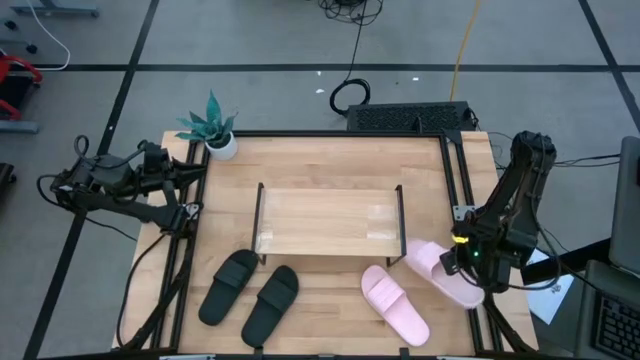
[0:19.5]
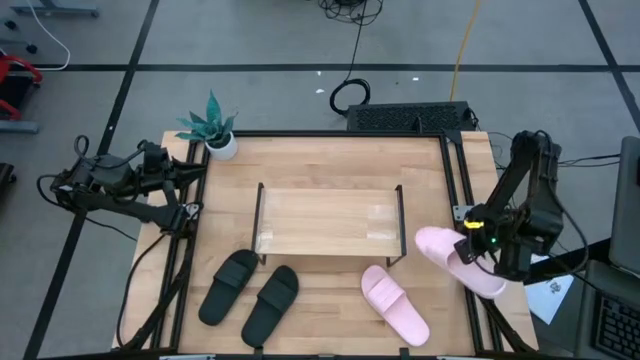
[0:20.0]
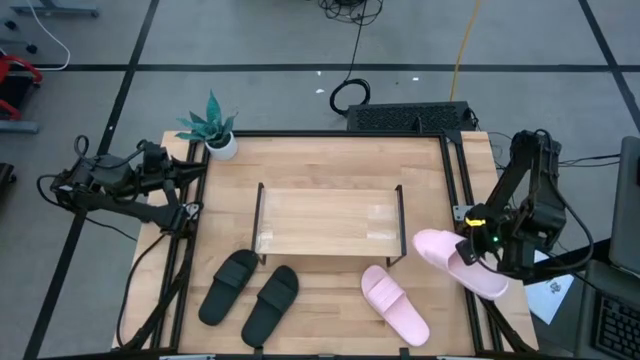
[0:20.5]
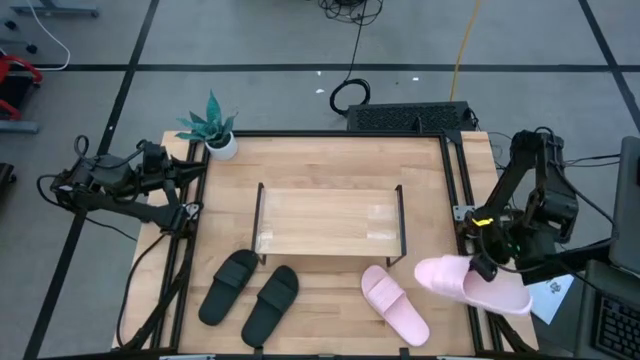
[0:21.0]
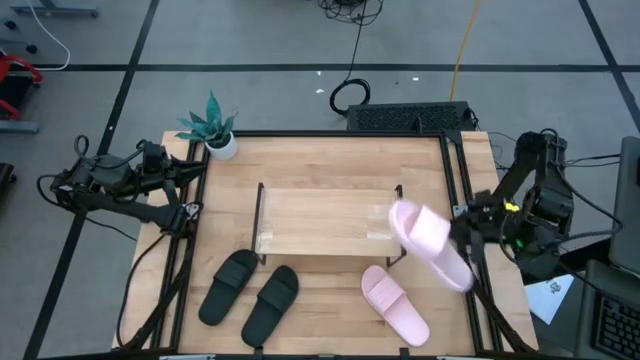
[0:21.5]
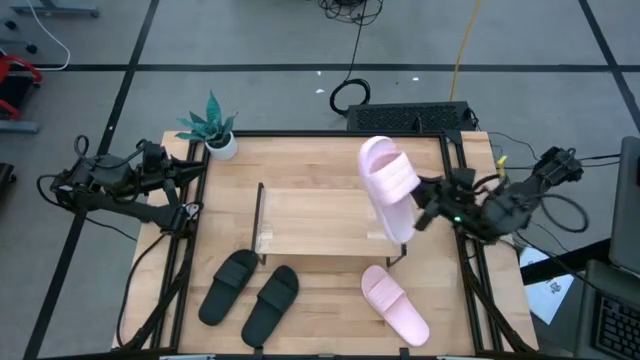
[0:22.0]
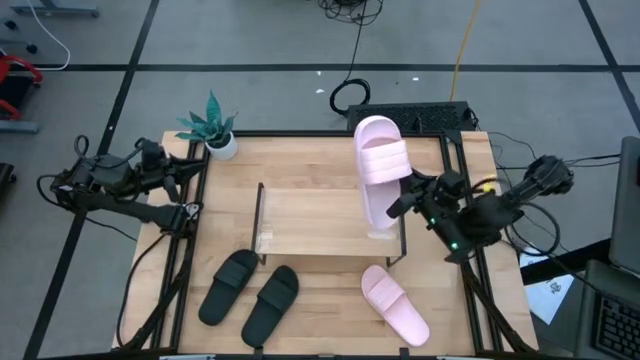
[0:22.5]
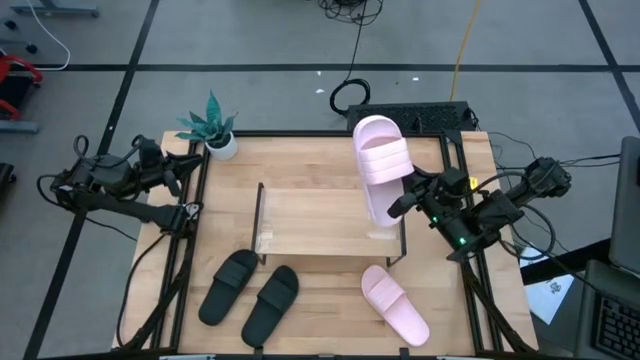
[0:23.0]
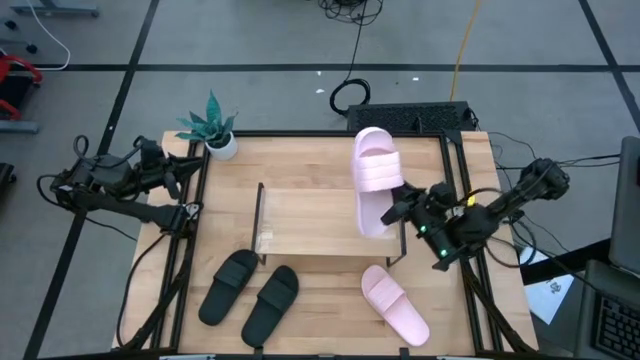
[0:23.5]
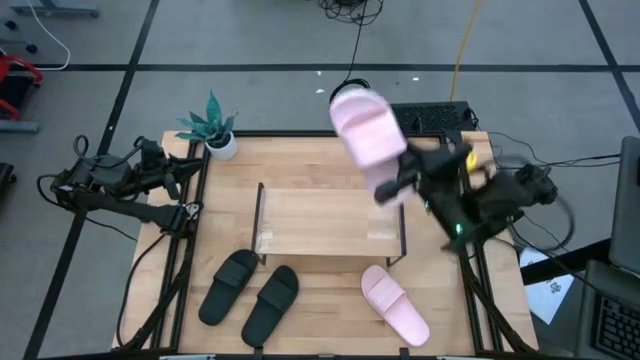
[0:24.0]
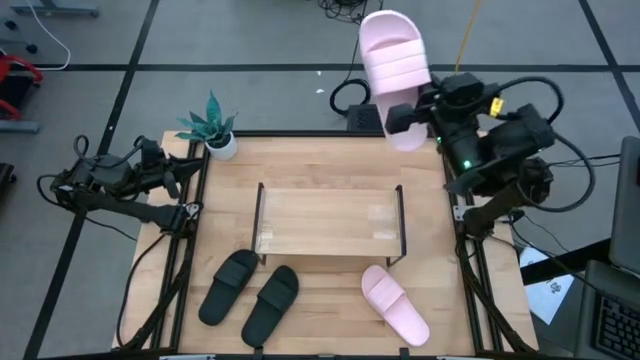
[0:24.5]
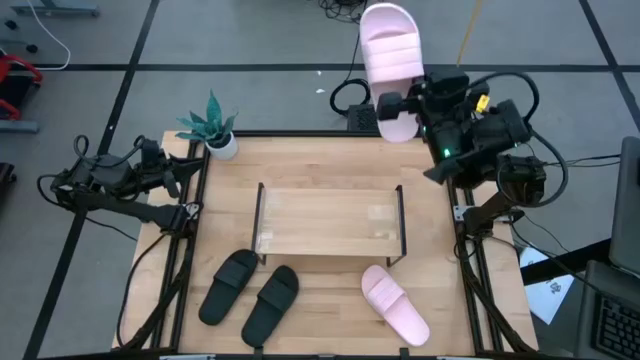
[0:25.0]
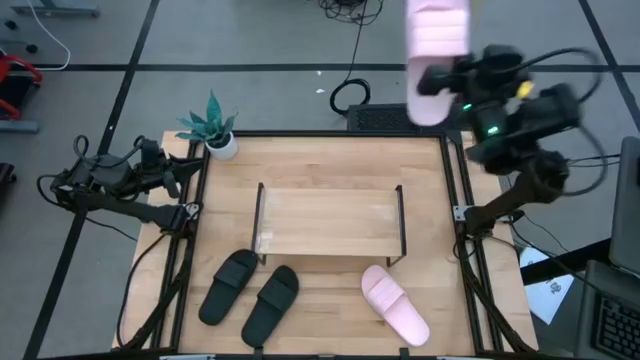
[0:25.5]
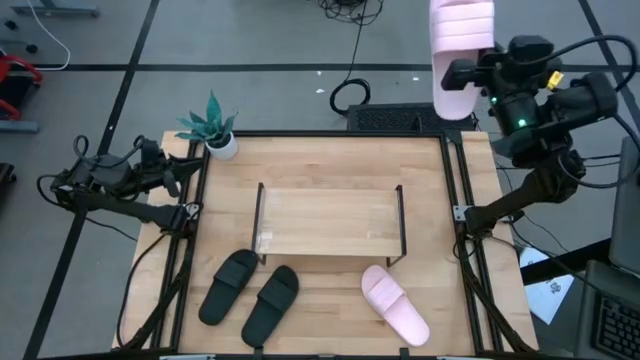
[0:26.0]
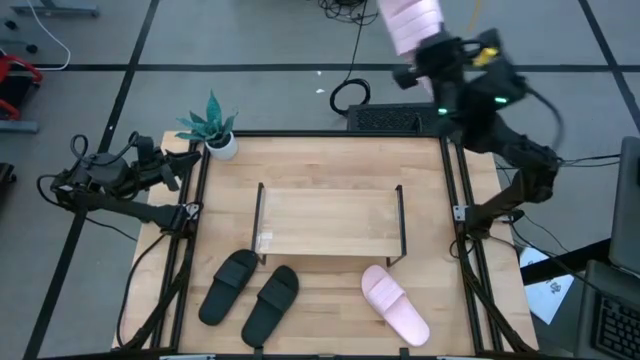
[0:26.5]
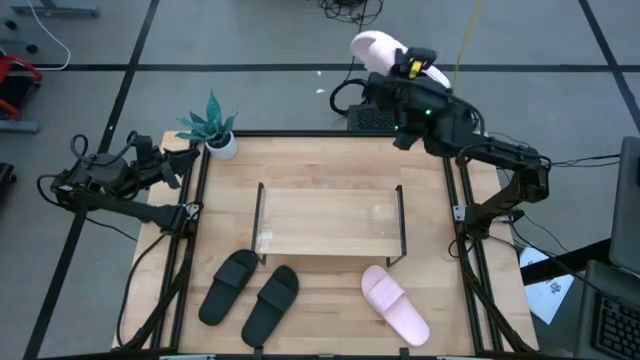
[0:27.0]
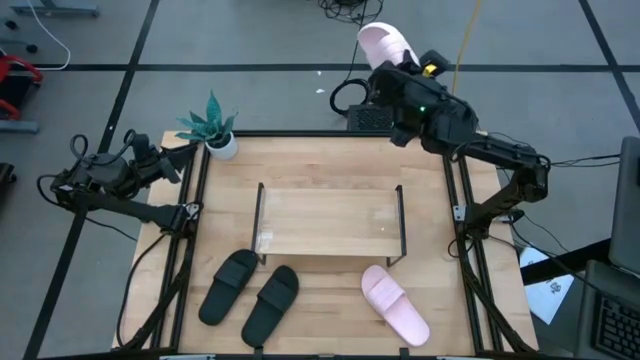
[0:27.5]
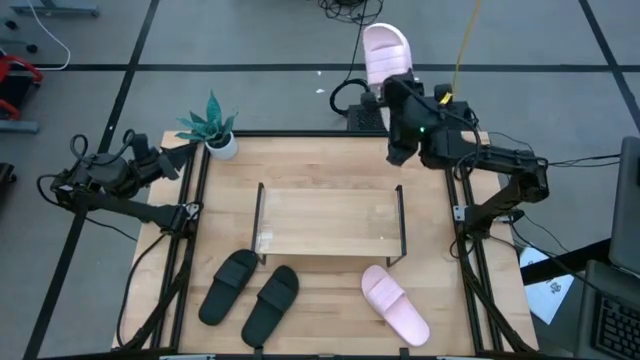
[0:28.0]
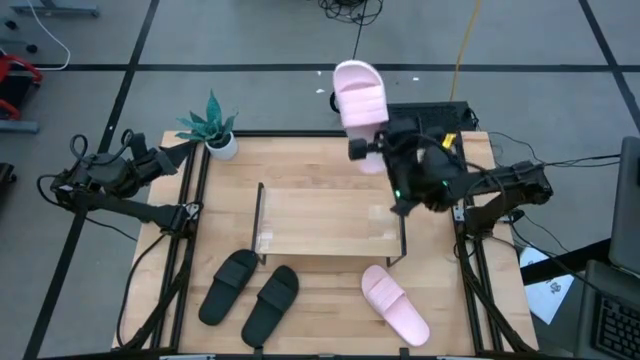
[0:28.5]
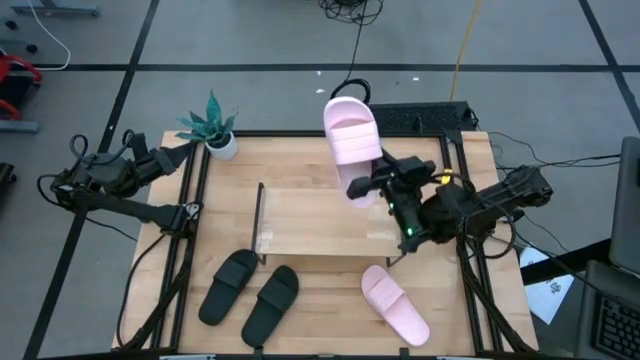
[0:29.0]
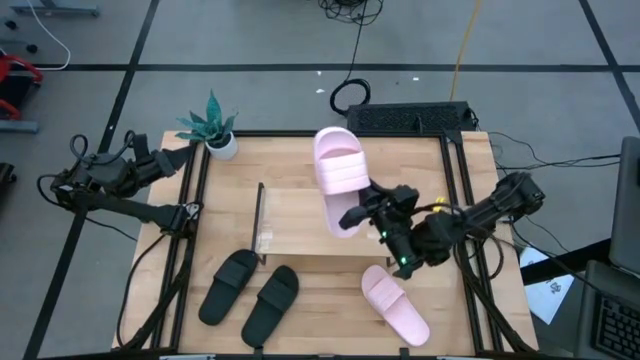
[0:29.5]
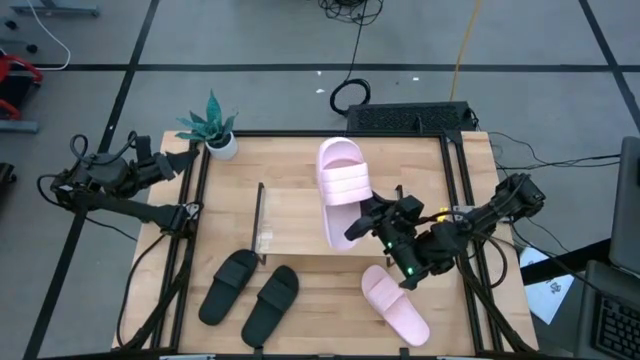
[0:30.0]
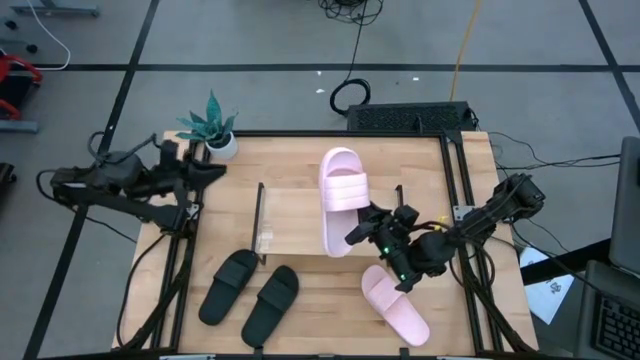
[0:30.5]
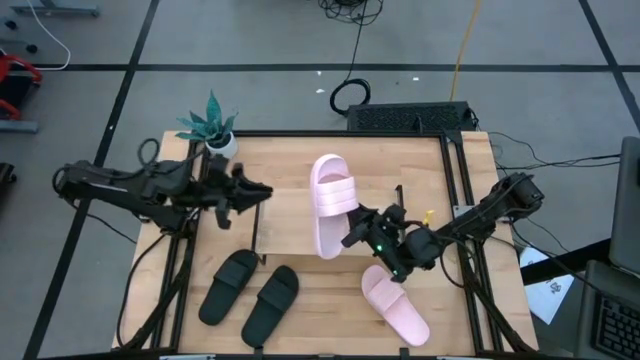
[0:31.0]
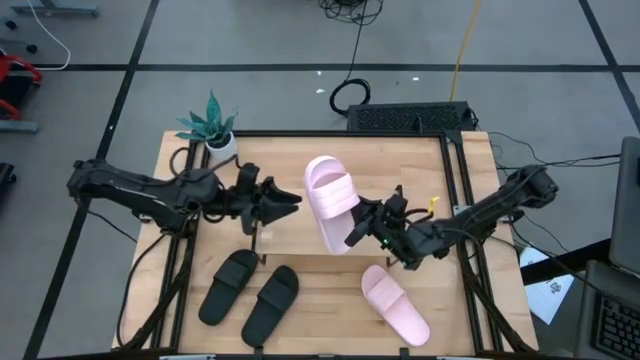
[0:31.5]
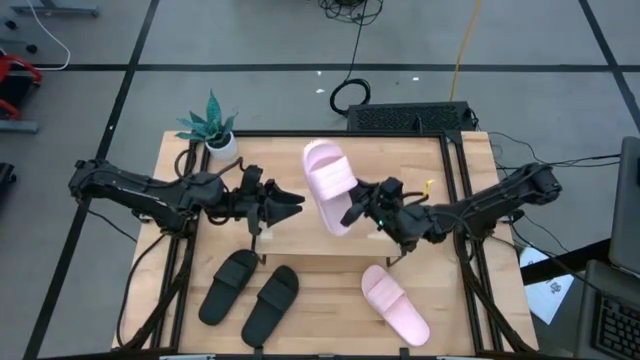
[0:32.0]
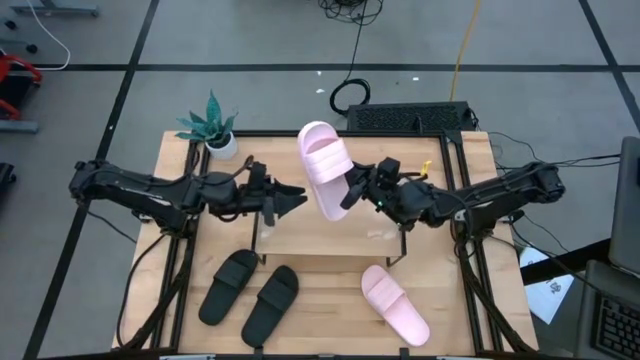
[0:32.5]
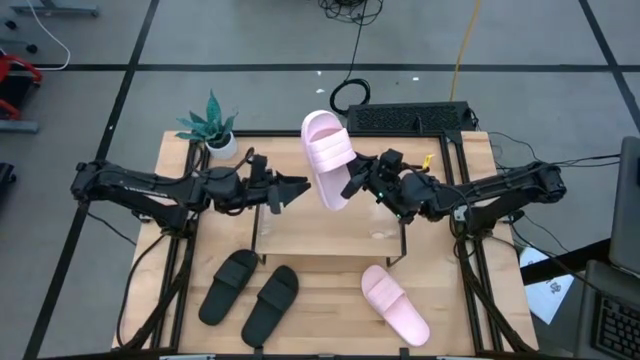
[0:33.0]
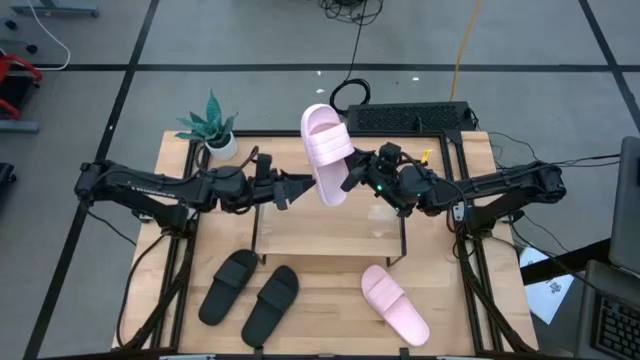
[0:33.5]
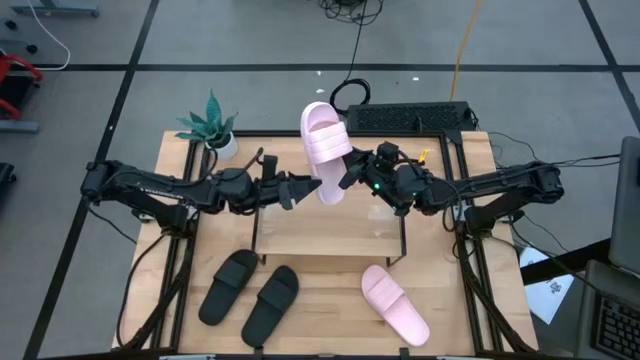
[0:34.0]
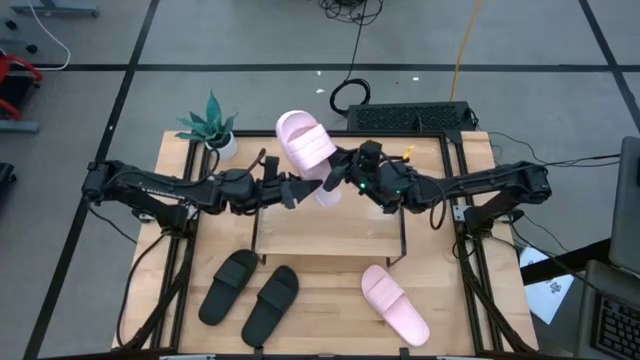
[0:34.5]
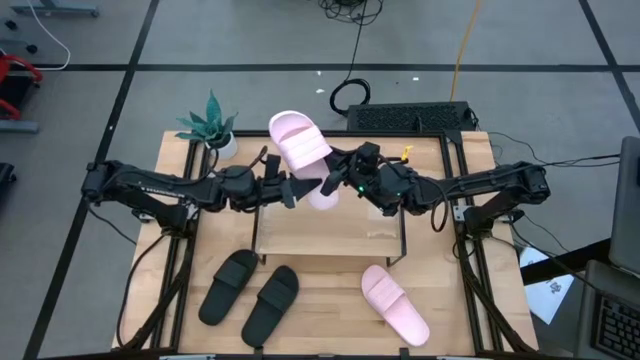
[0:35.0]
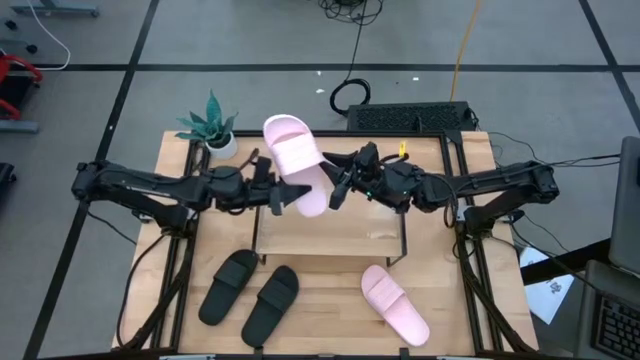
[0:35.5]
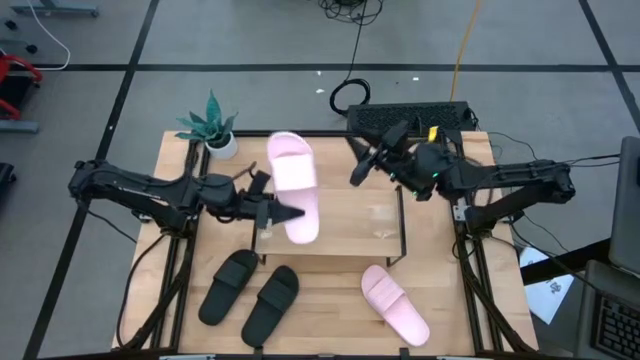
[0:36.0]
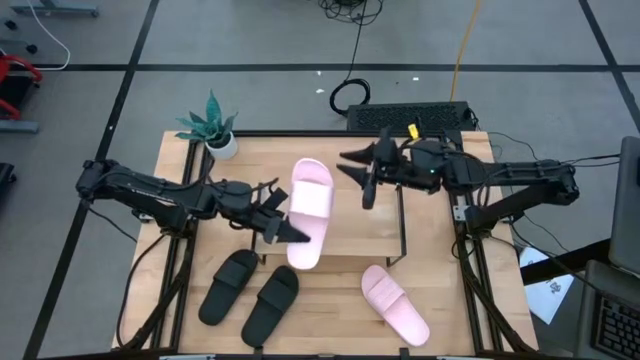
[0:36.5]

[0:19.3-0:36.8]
Task: Pick and place slides into the shelf
Put the right pink slipper on the shelf
